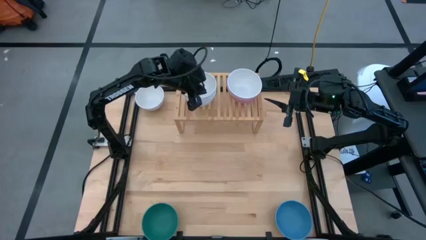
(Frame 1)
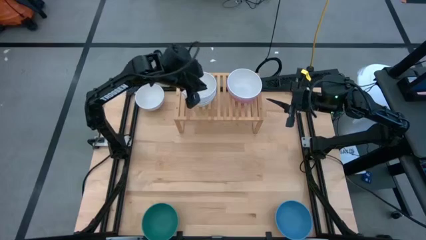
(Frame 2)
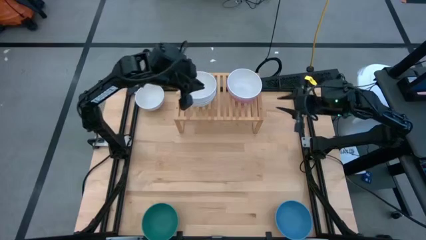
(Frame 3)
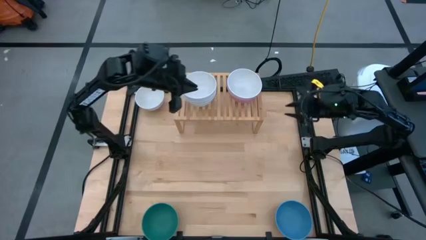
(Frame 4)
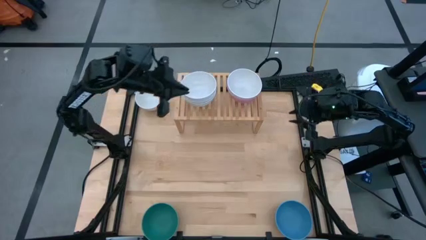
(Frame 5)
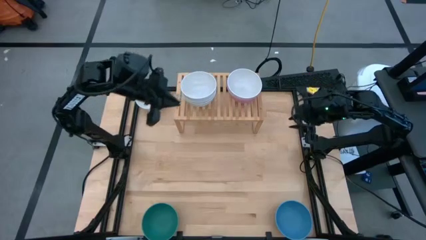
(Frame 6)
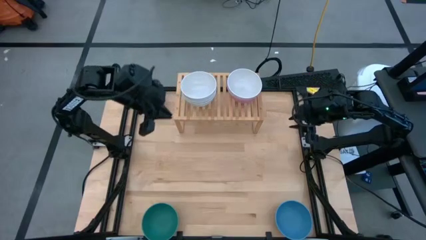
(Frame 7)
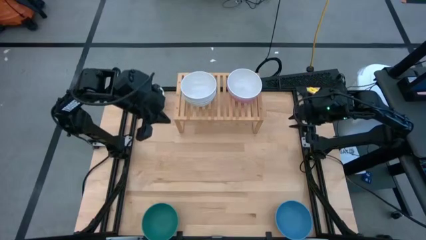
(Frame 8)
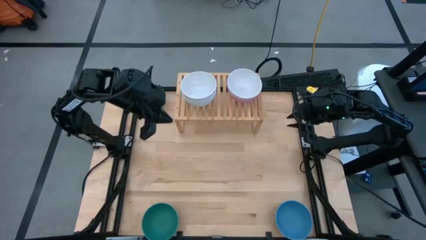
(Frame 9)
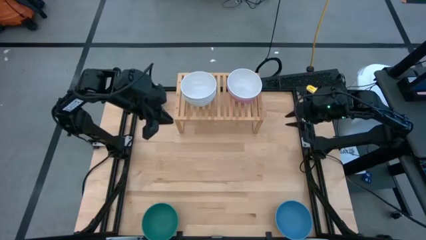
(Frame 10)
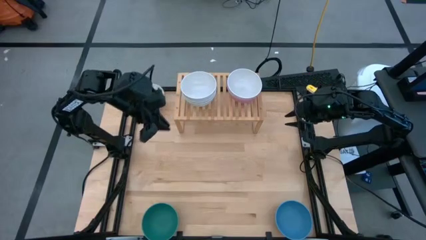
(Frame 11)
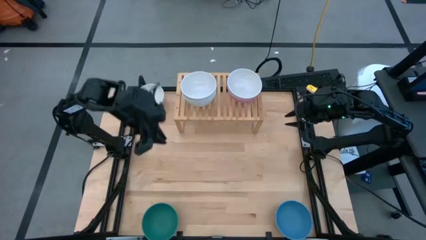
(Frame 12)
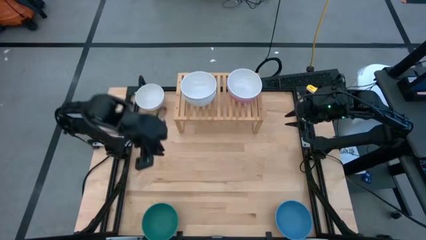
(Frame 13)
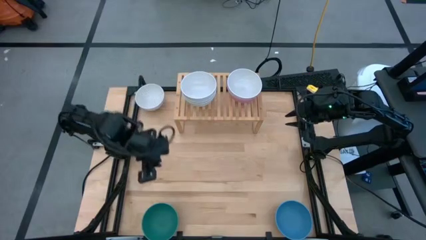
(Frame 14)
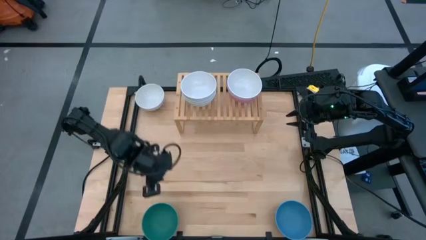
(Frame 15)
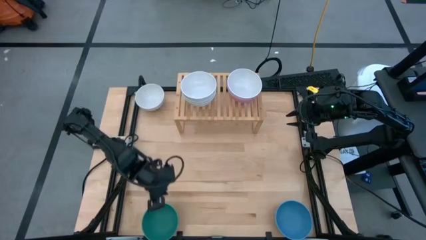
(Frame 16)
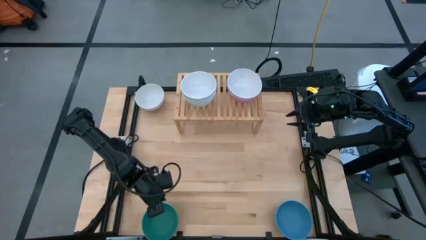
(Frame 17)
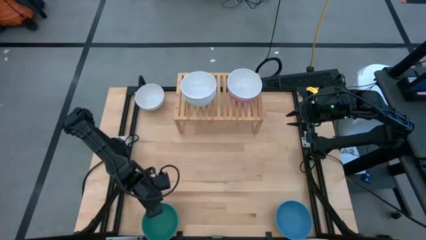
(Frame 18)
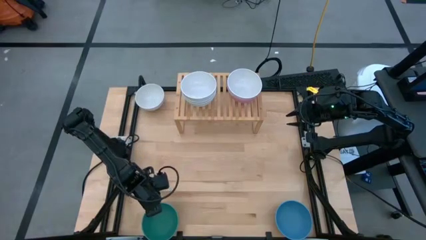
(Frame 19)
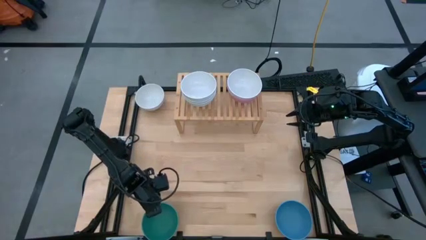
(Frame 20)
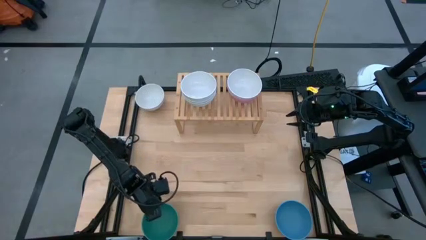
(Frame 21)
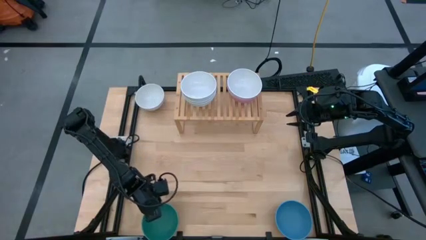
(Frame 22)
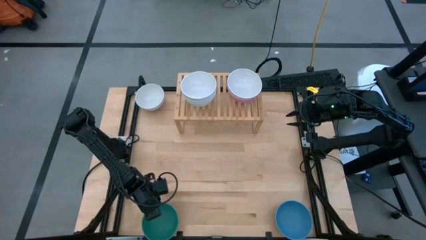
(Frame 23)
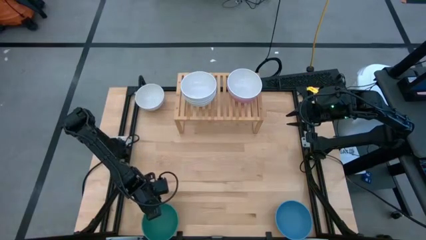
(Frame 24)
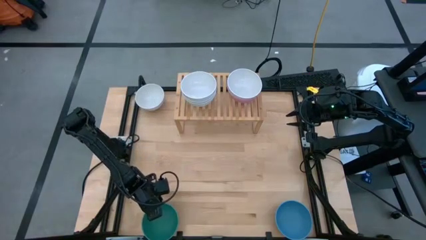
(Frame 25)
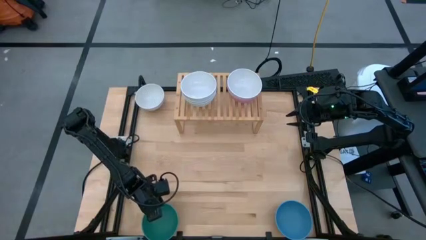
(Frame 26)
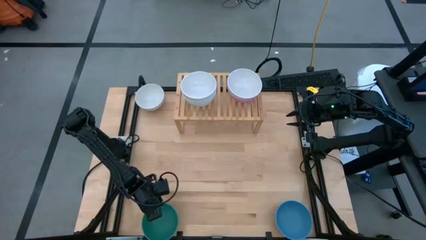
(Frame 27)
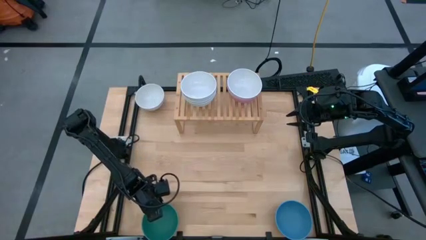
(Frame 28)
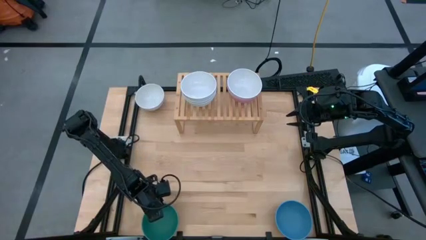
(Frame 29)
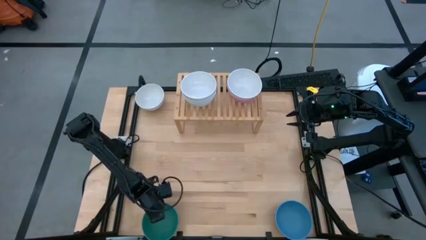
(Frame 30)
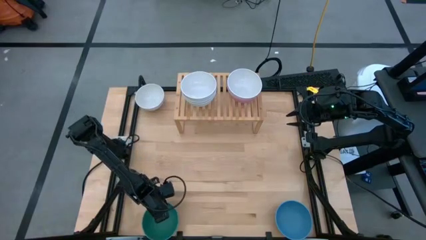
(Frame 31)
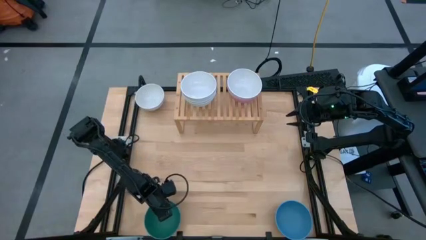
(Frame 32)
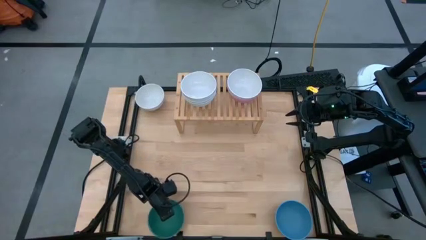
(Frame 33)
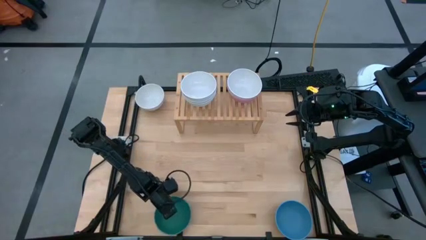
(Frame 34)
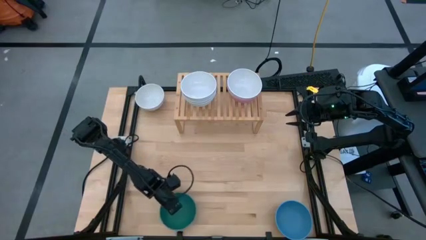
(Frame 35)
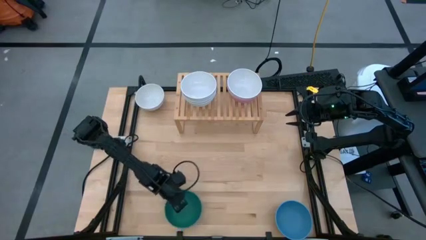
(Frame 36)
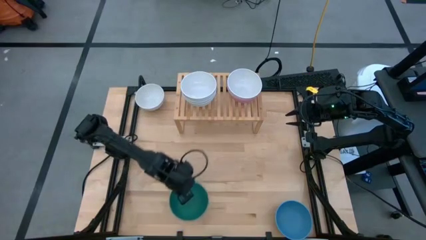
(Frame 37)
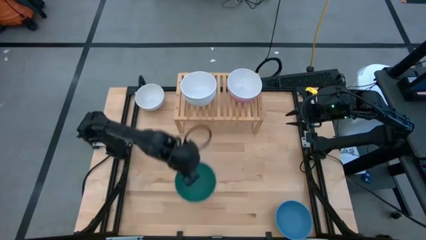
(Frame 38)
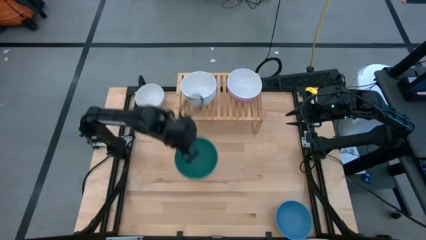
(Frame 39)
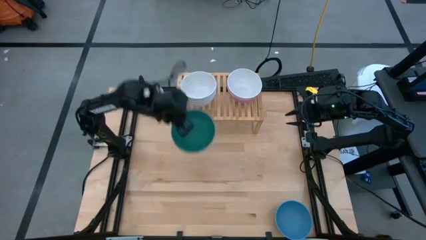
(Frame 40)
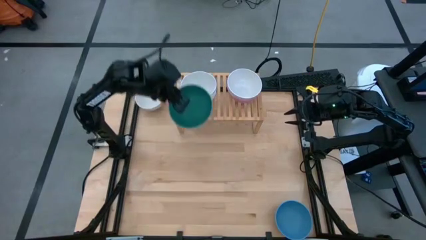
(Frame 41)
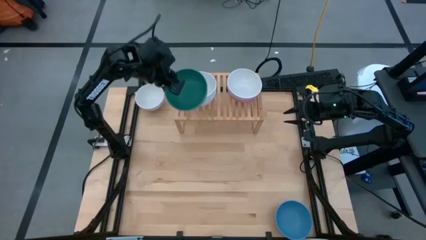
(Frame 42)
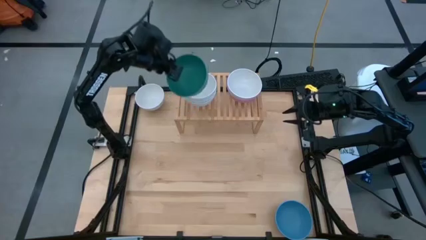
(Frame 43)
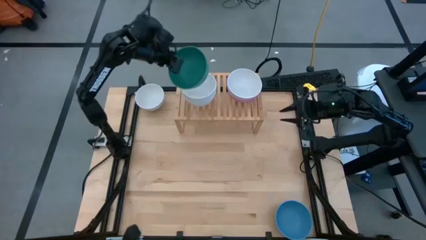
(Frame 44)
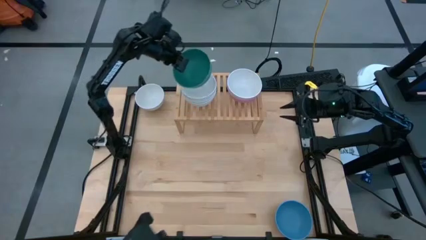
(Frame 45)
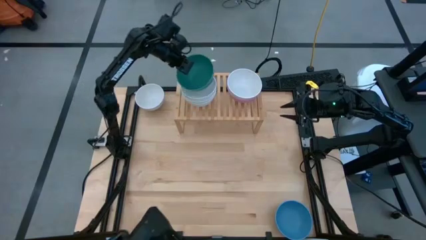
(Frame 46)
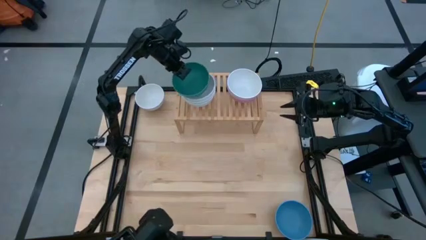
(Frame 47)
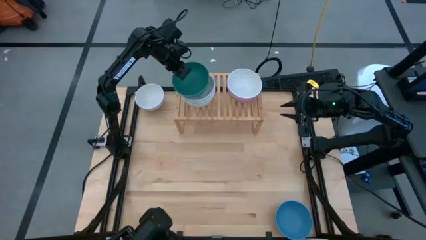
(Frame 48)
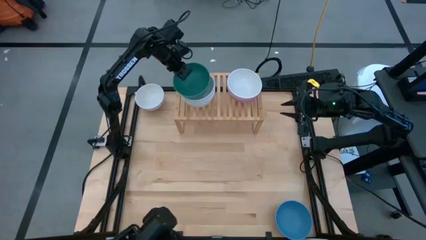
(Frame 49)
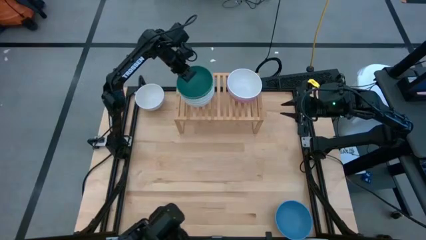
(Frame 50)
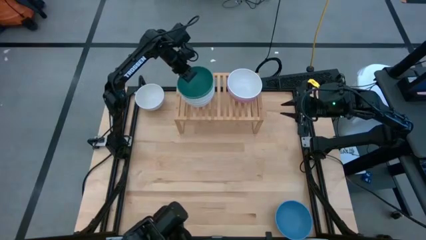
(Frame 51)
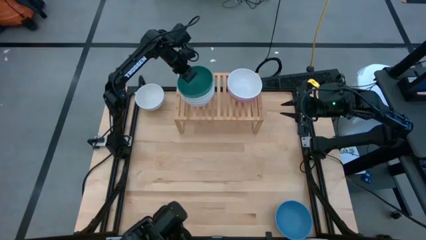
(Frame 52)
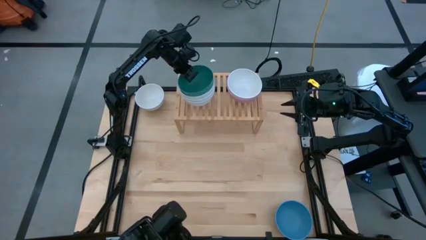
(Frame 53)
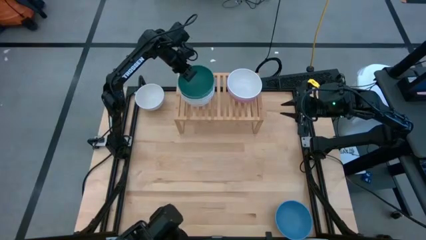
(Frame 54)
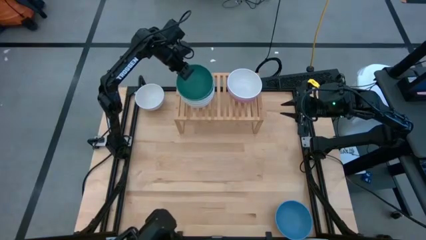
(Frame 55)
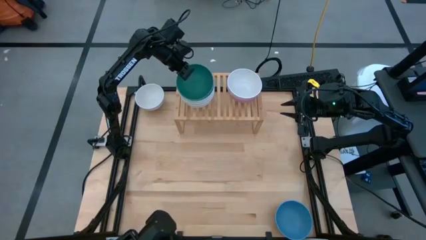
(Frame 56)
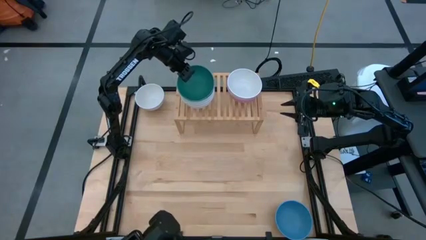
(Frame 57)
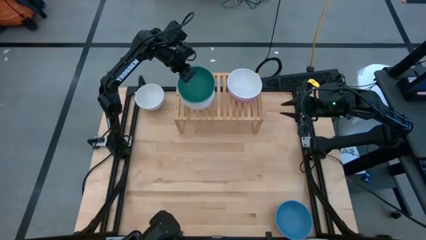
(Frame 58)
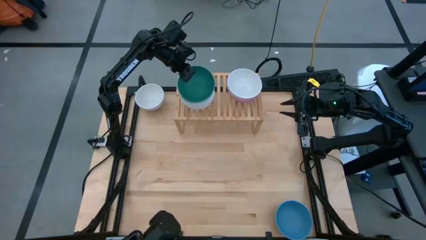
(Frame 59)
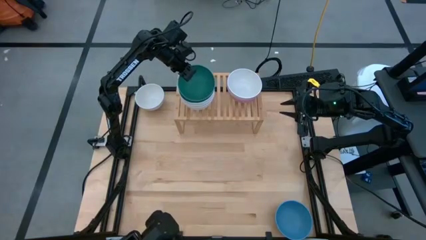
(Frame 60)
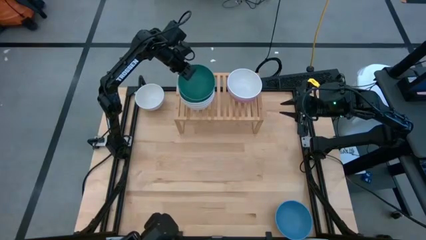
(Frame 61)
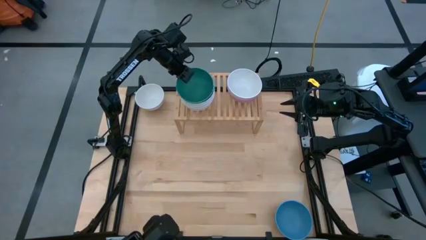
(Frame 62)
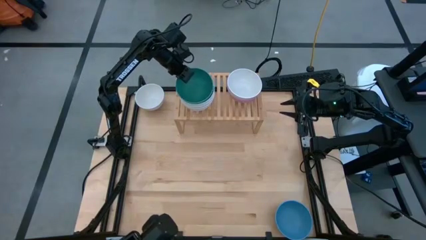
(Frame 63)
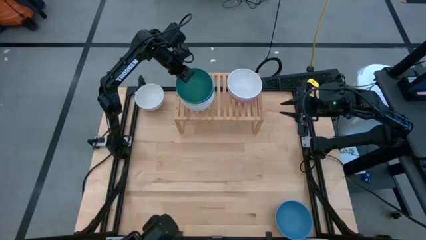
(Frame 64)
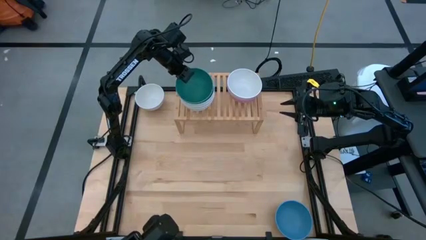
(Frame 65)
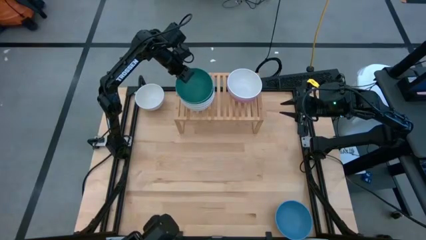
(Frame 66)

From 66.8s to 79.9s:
Task: Place and stack bowls onto a shelf
Stack the green bowl on top of the white bowl on the shelf
